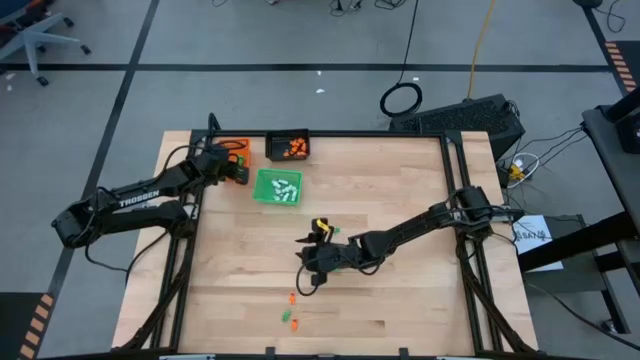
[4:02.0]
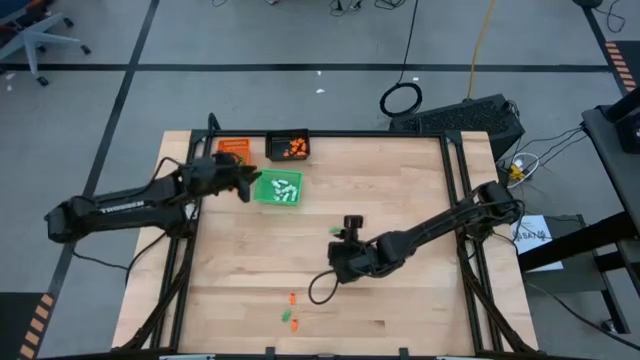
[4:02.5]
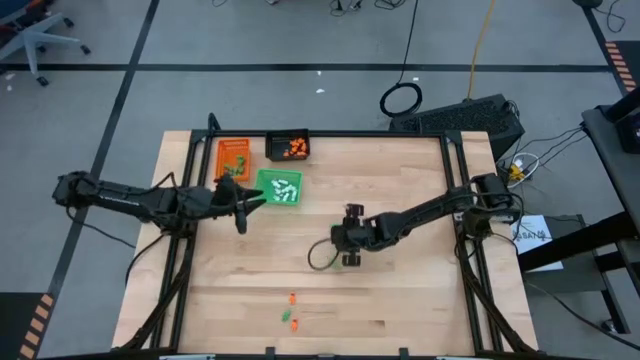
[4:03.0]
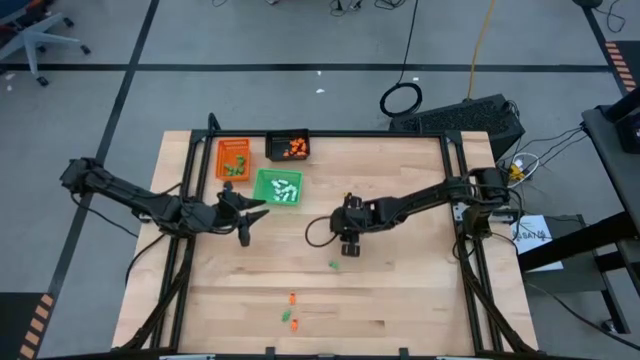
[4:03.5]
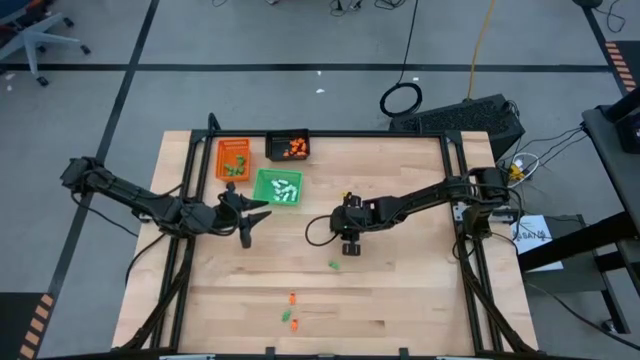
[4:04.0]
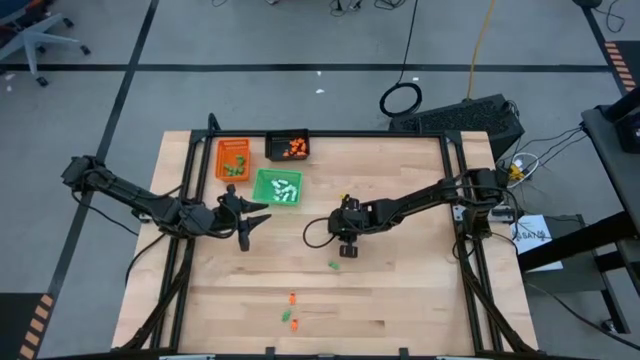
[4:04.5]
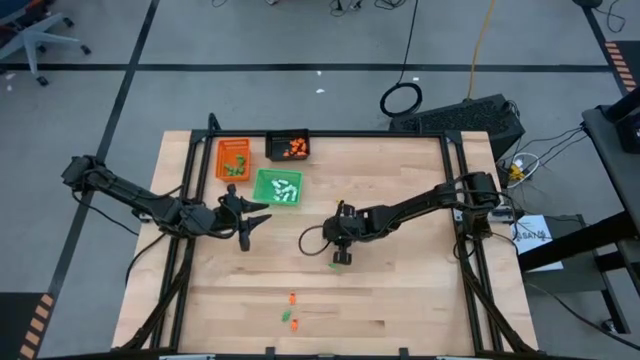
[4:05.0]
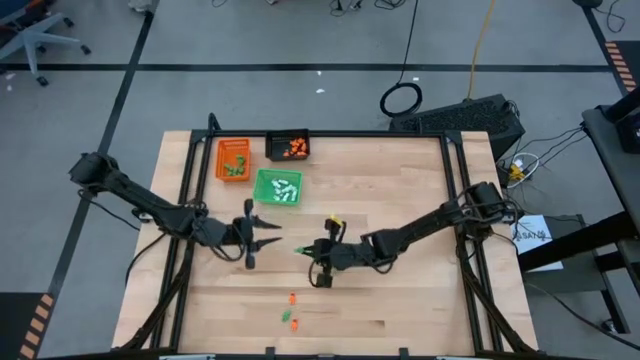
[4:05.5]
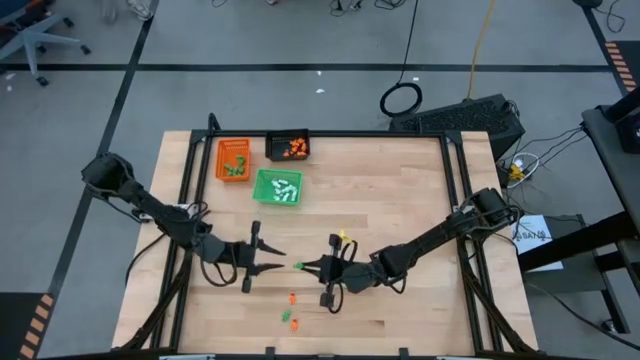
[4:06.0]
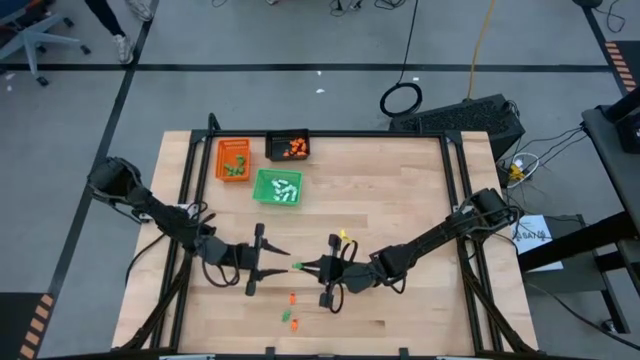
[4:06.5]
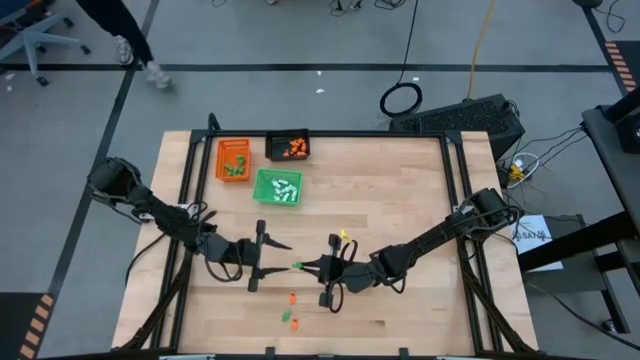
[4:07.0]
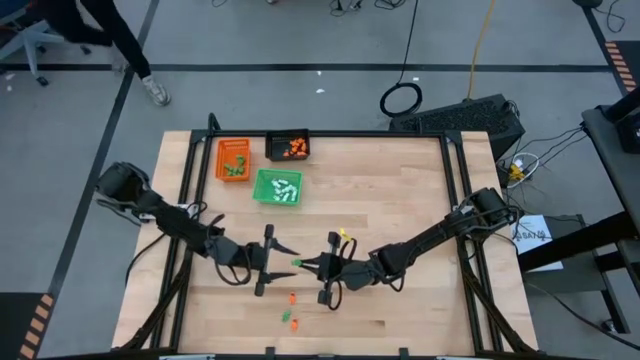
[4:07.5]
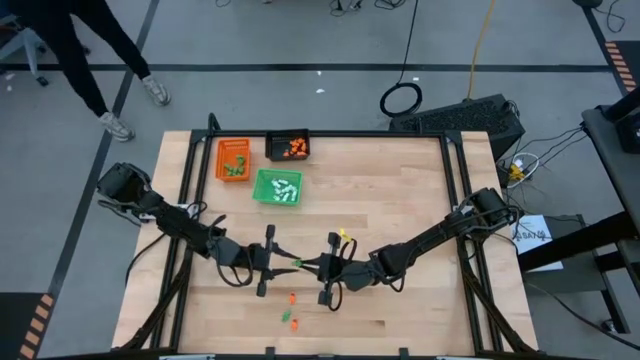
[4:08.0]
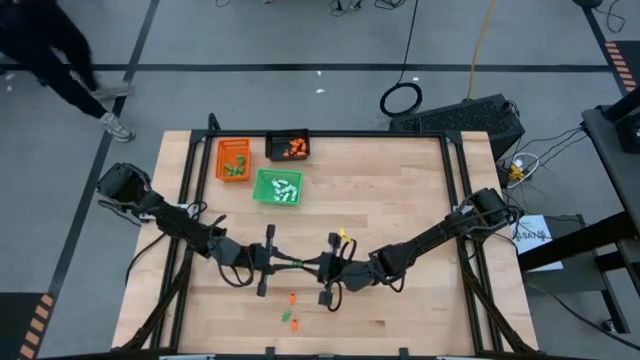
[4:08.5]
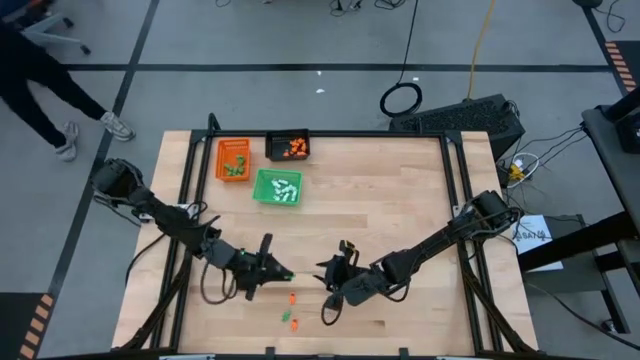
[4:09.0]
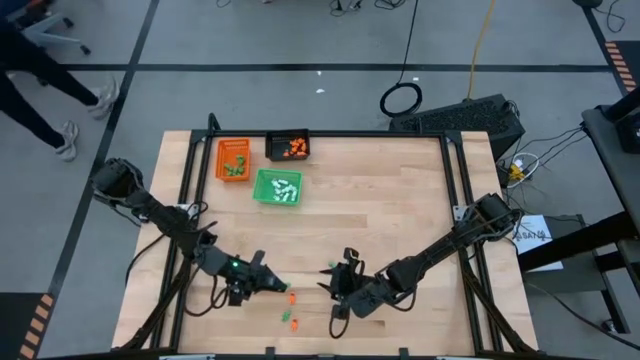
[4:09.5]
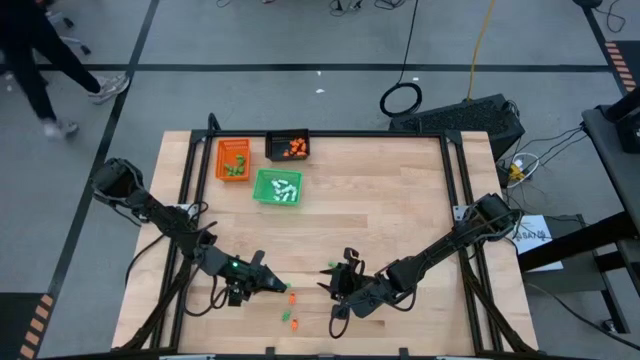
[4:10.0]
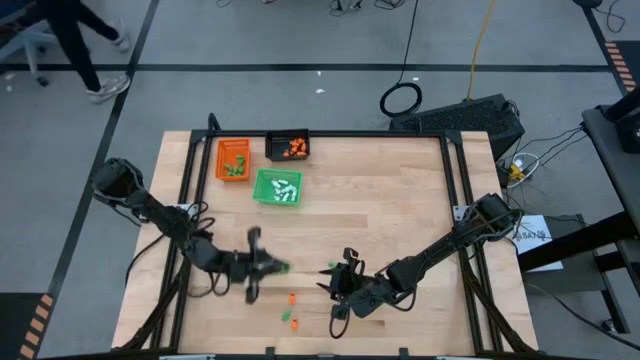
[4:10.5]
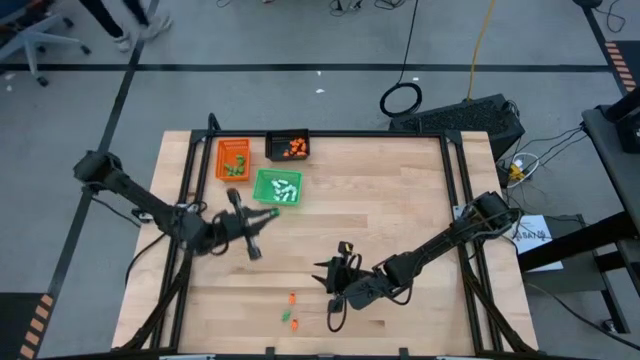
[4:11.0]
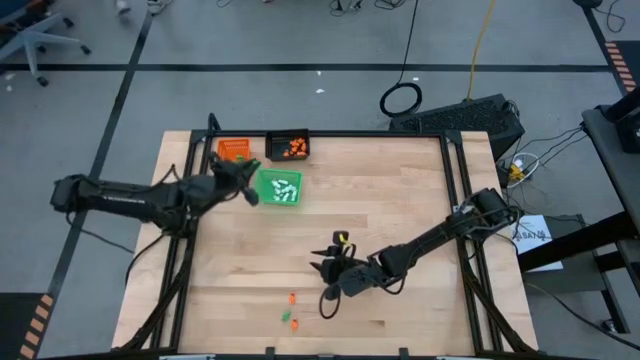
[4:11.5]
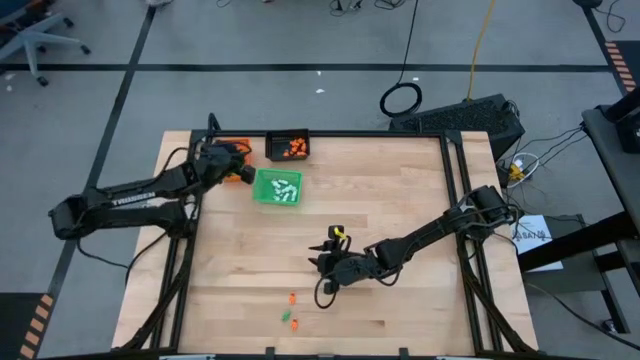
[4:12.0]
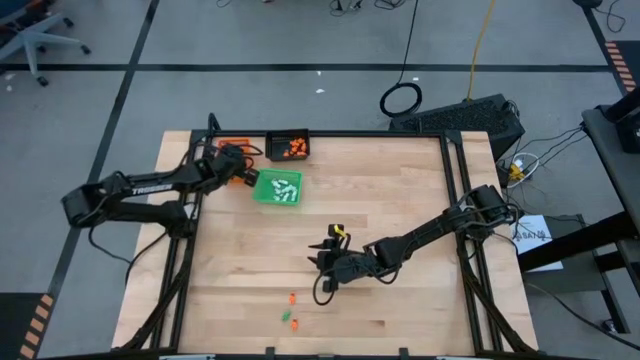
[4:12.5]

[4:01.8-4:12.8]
Task: Sort Halloween decoration
Put the green skeleton toy into the orange bin

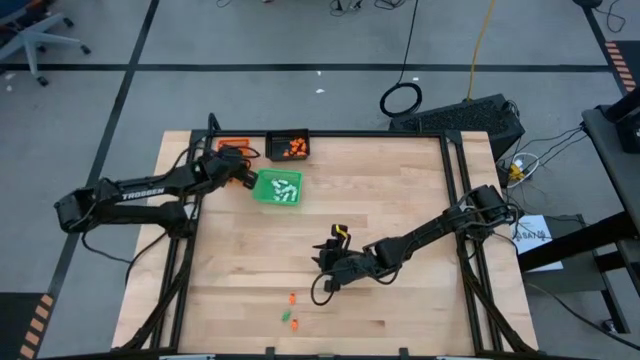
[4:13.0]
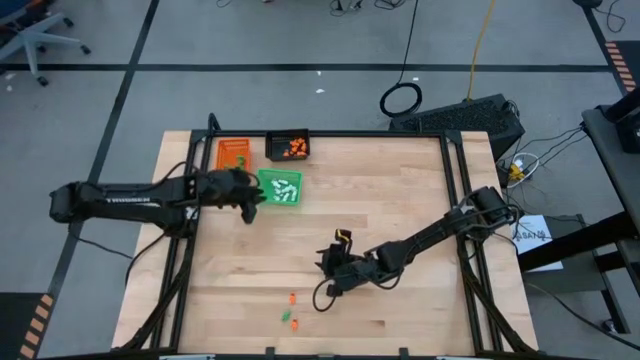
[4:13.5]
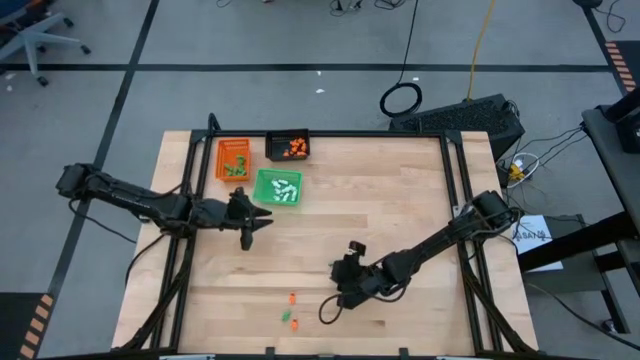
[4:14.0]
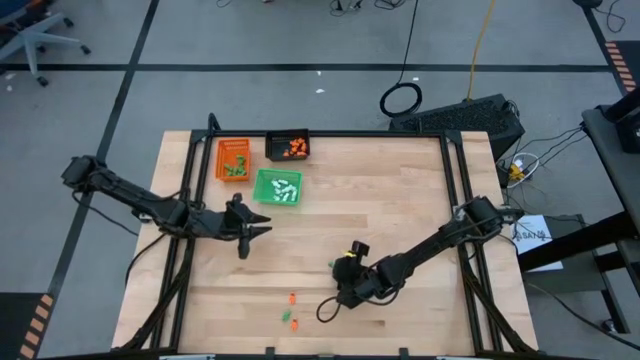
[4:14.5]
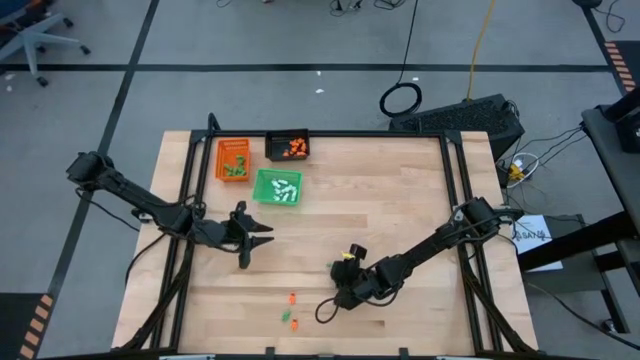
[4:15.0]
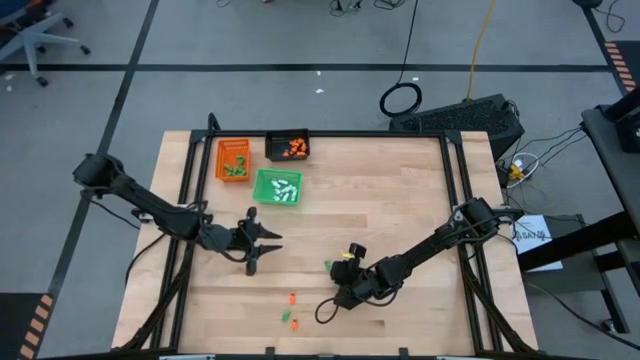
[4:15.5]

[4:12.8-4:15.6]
Put the green skeleton toy into the orange bin

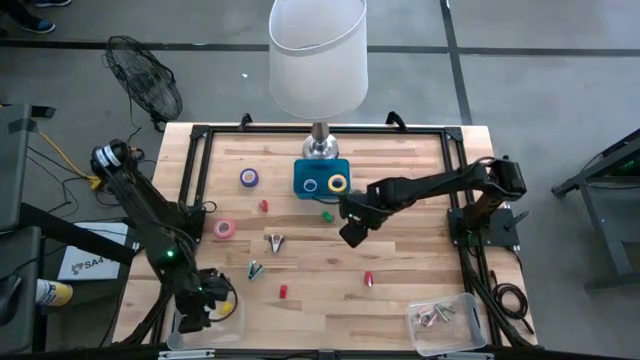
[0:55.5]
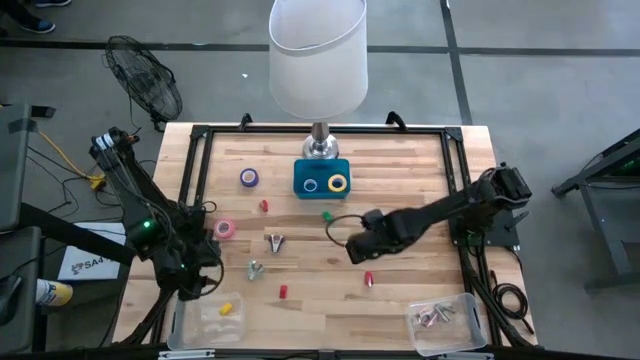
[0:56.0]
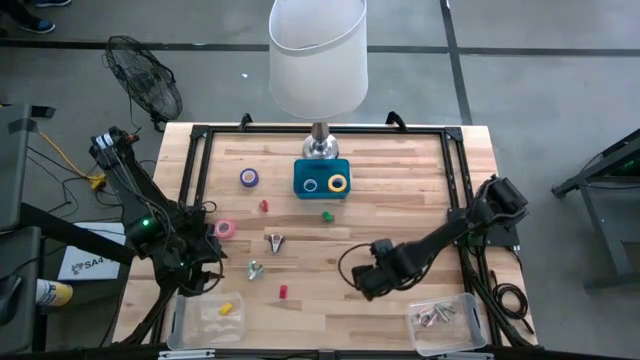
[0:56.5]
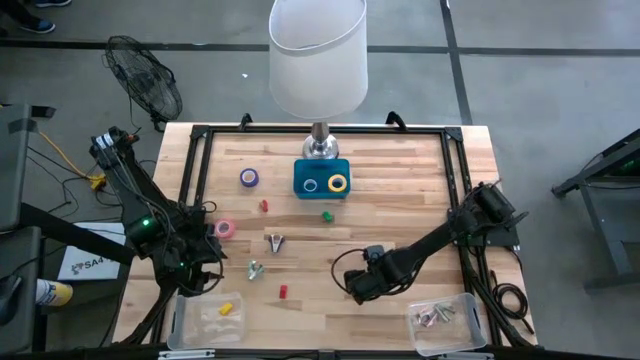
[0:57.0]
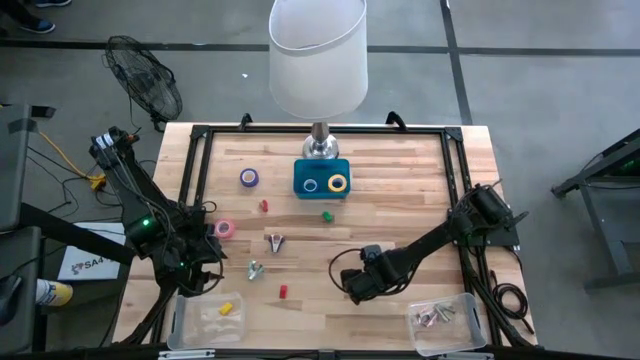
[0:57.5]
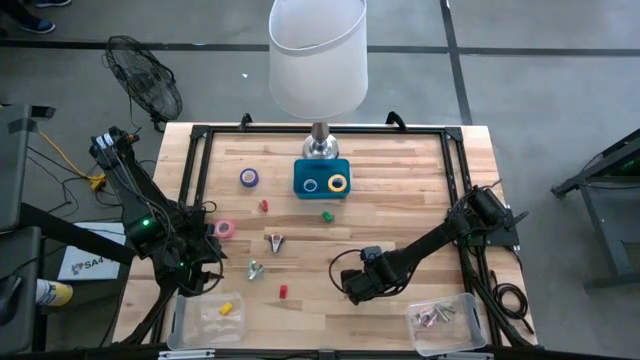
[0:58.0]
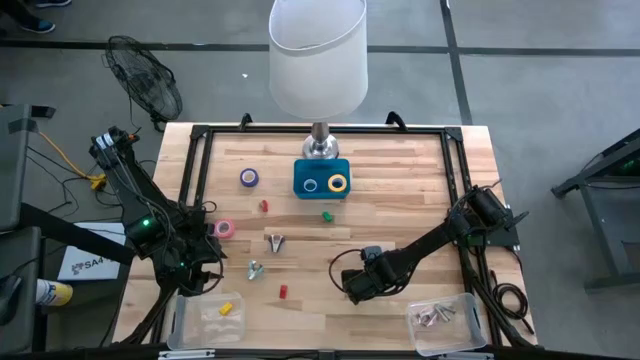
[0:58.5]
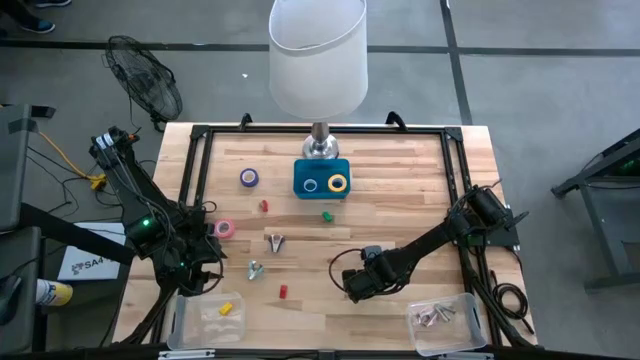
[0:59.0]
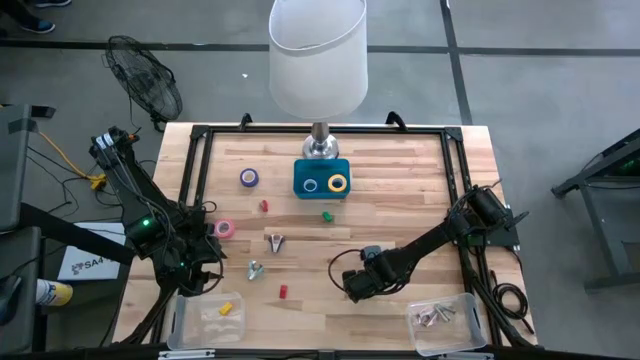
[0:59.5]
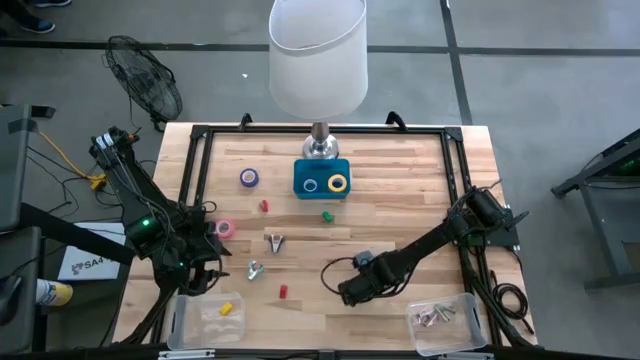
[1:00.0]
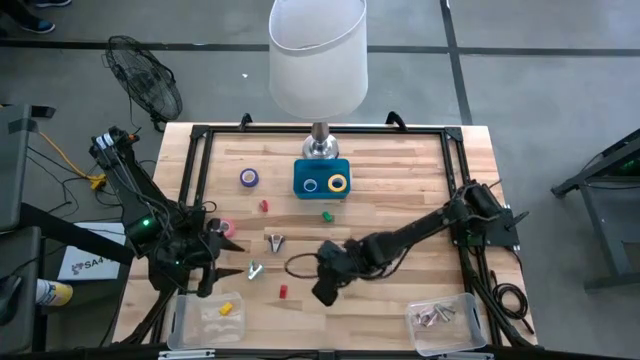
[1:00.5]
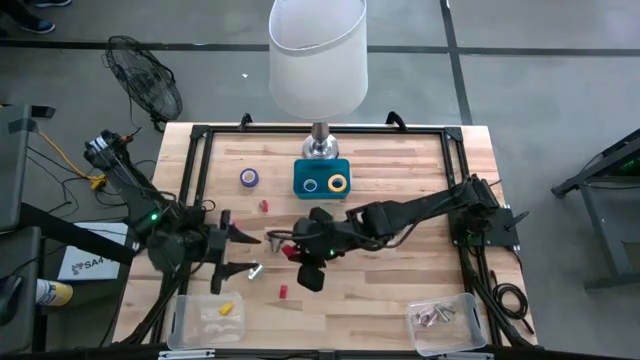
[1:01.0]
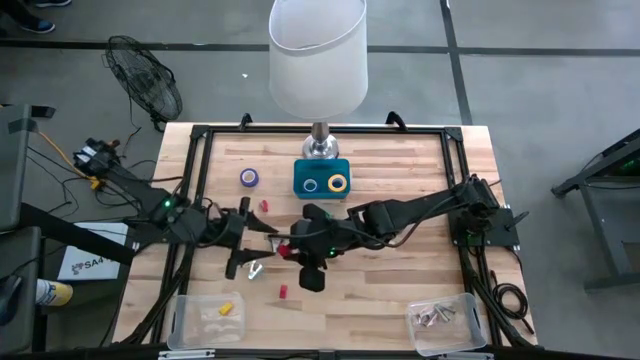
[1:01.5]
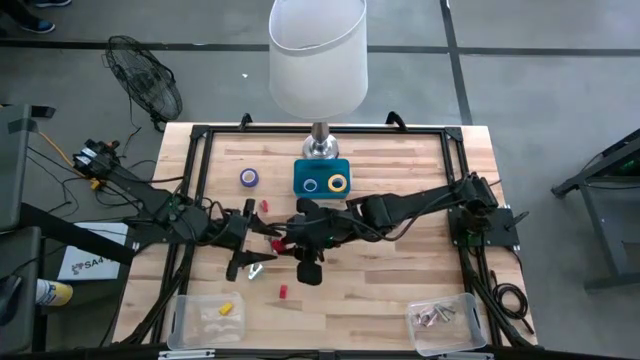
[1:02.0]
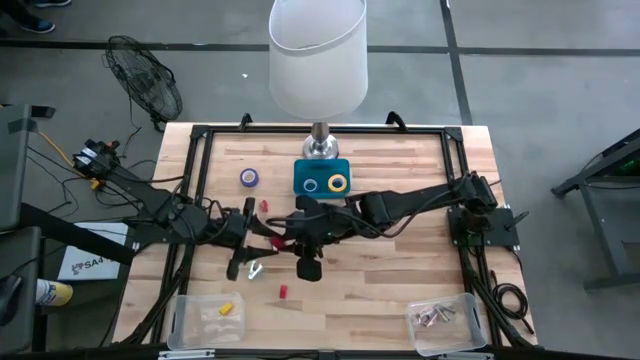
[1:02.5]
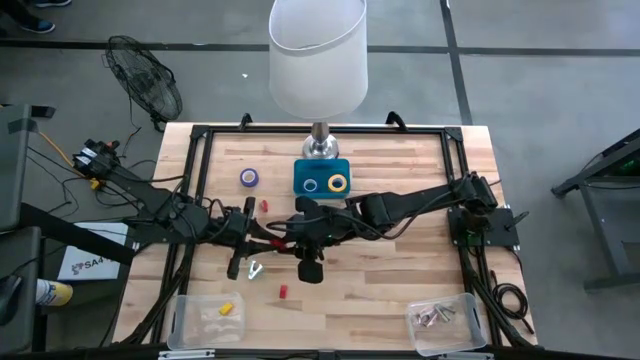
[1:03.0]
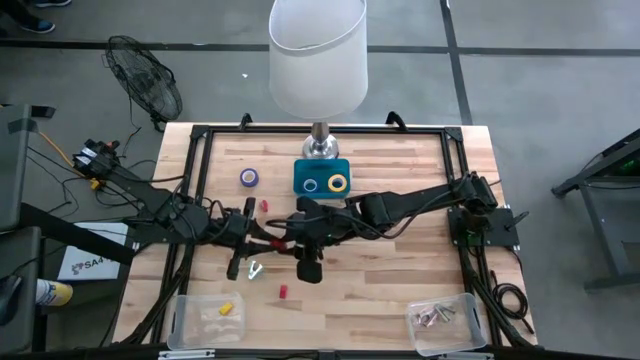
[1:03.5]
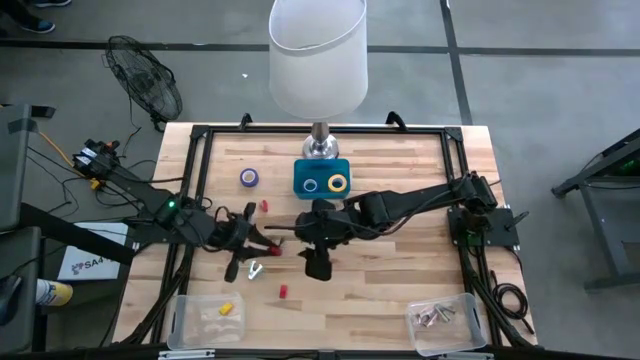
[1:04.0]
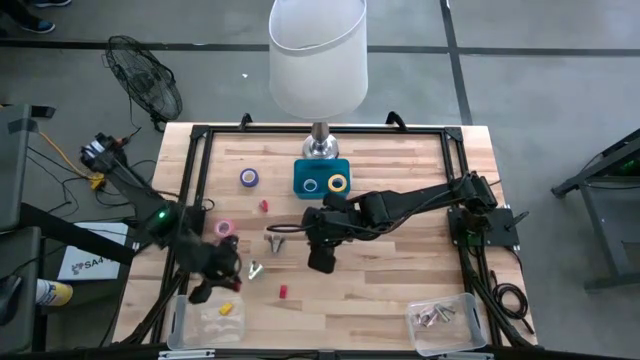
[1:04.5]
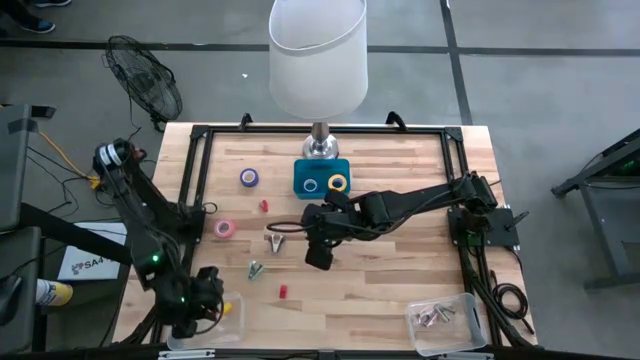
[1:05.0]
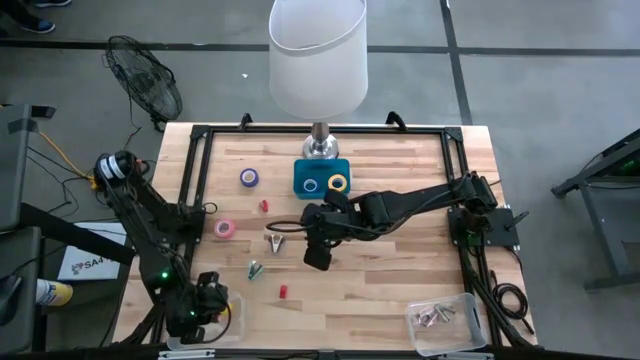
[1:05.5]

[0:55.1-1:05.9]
Task: Pick and place Stapler, Stapler remover, tape
Put the right red stapler into the left transparent bin
